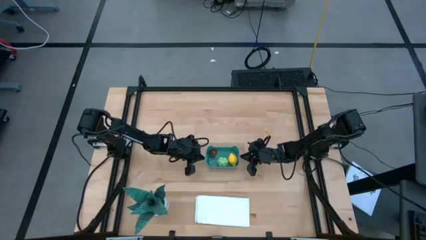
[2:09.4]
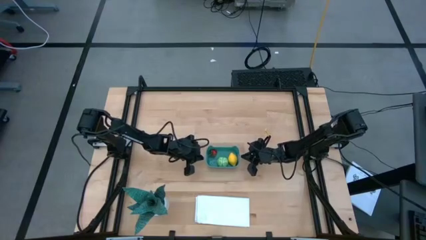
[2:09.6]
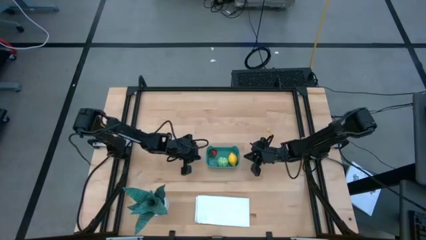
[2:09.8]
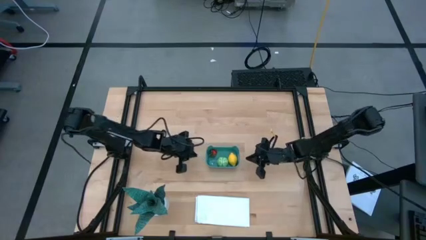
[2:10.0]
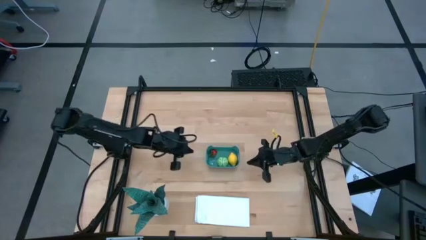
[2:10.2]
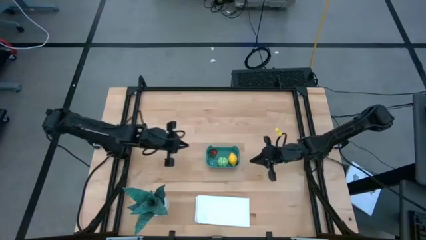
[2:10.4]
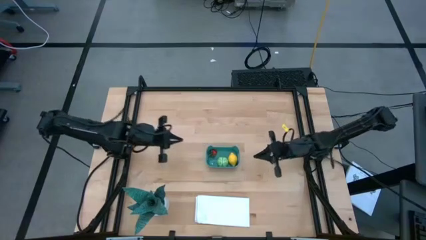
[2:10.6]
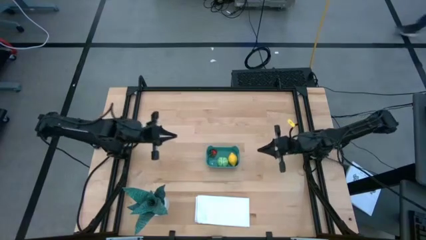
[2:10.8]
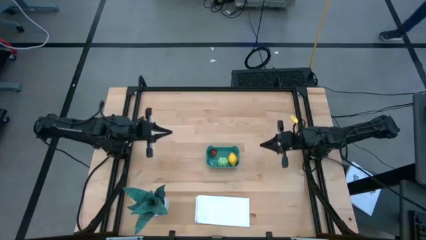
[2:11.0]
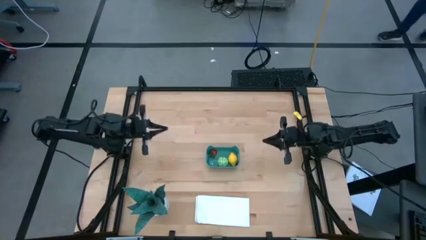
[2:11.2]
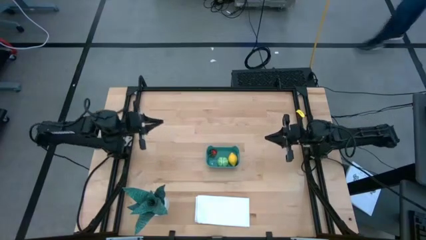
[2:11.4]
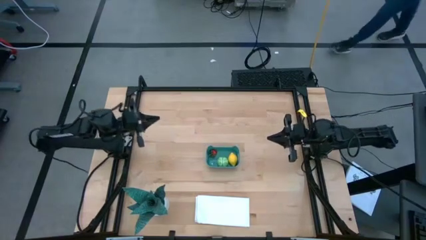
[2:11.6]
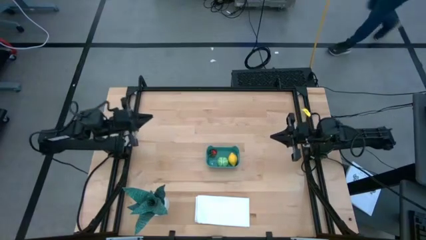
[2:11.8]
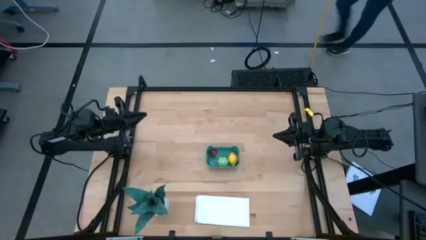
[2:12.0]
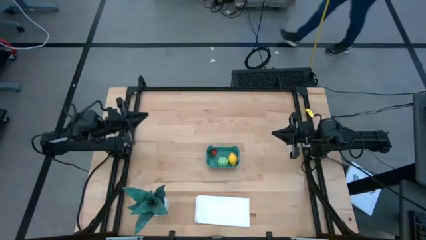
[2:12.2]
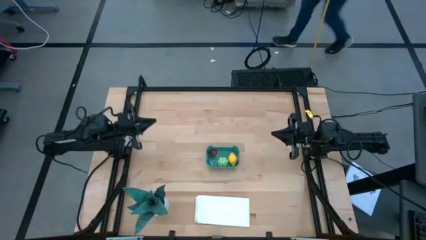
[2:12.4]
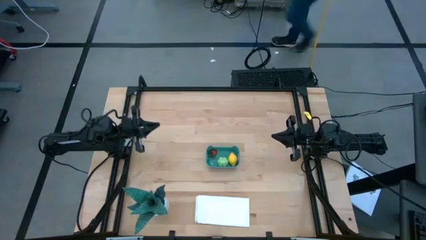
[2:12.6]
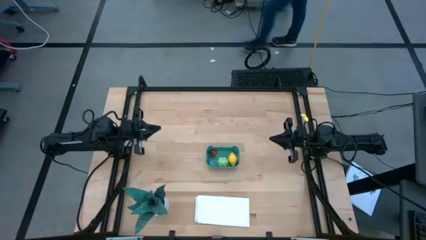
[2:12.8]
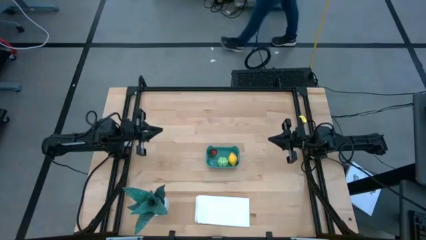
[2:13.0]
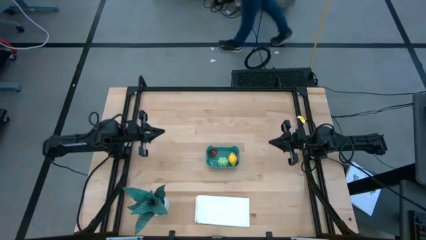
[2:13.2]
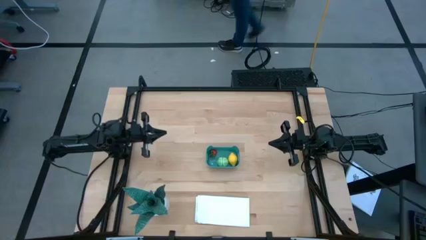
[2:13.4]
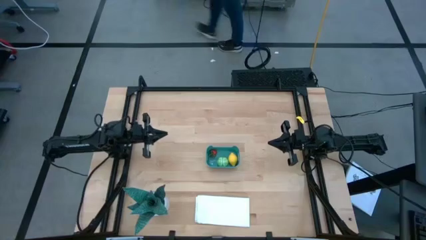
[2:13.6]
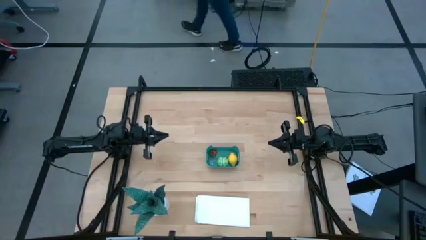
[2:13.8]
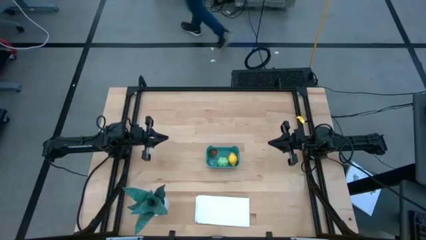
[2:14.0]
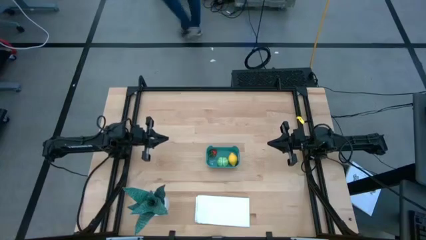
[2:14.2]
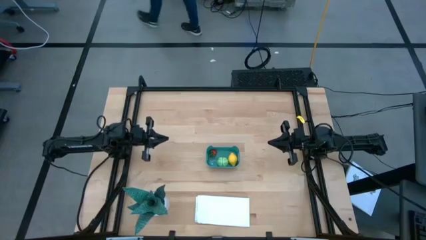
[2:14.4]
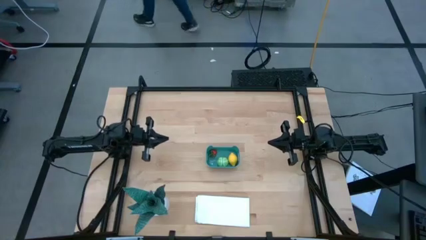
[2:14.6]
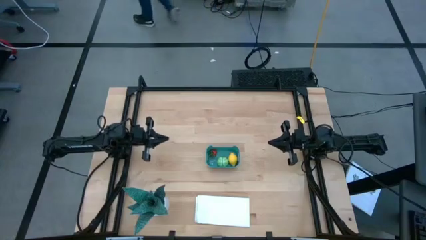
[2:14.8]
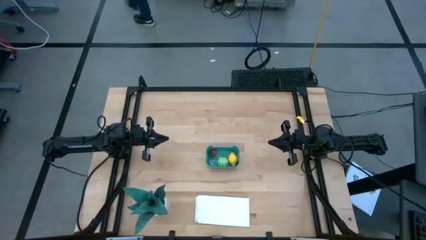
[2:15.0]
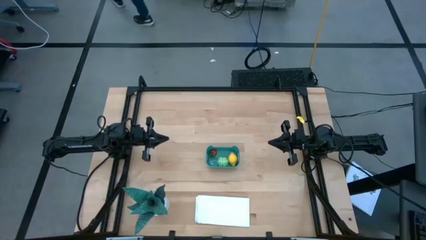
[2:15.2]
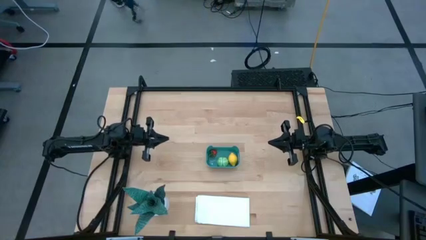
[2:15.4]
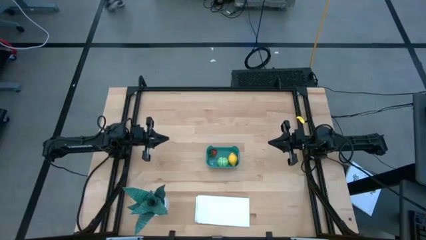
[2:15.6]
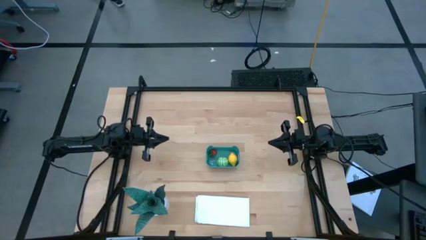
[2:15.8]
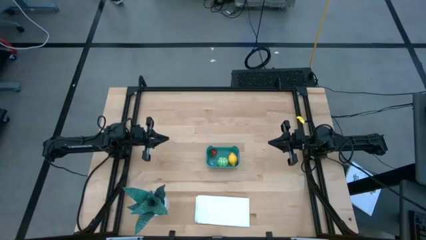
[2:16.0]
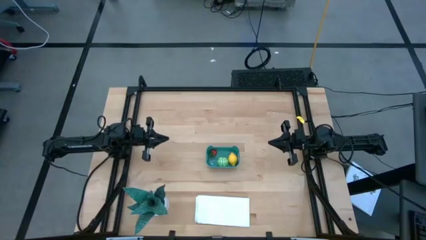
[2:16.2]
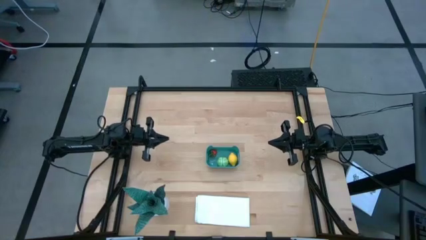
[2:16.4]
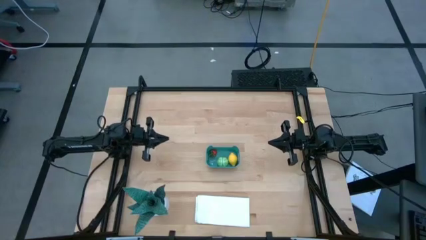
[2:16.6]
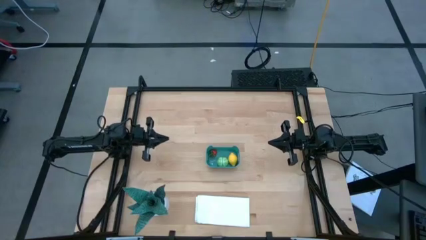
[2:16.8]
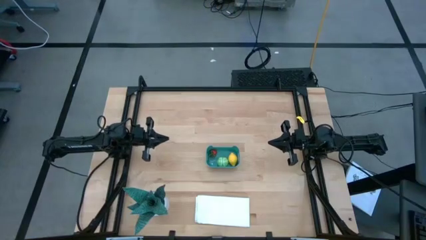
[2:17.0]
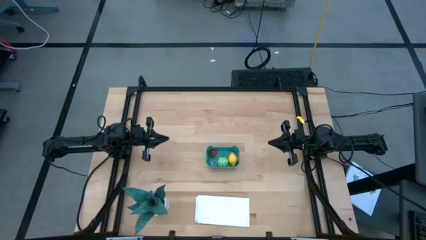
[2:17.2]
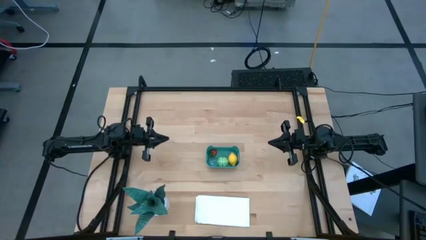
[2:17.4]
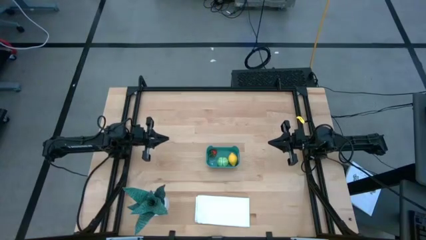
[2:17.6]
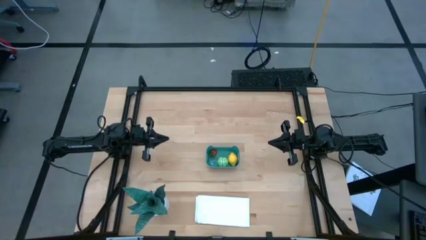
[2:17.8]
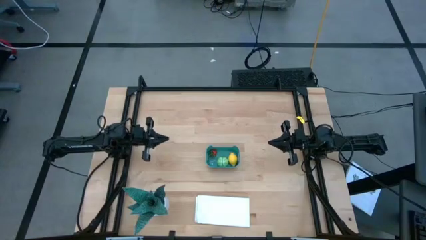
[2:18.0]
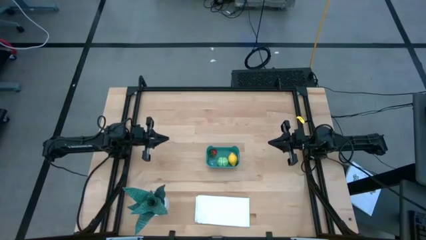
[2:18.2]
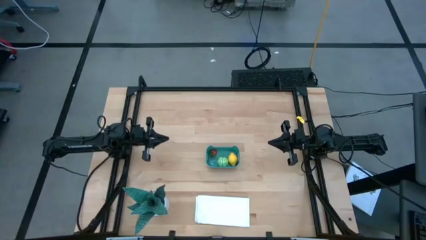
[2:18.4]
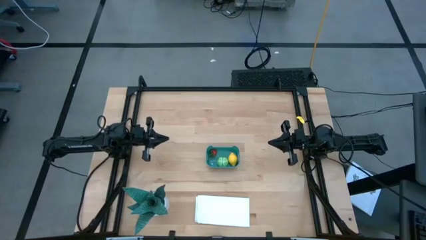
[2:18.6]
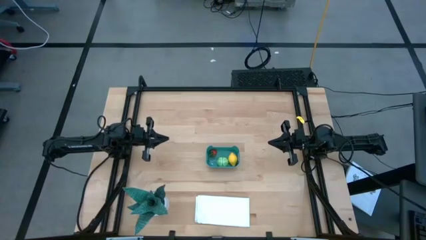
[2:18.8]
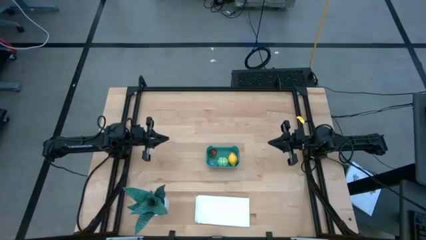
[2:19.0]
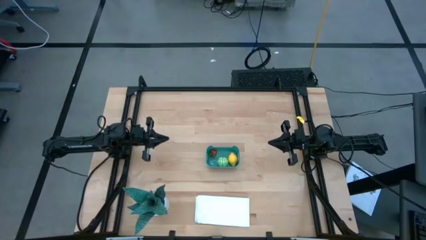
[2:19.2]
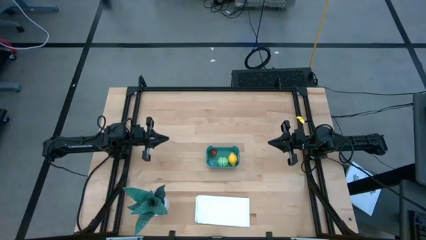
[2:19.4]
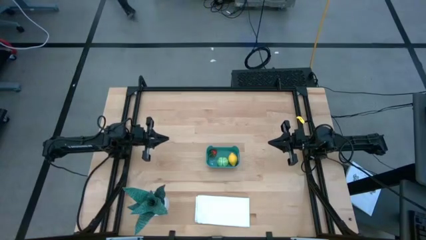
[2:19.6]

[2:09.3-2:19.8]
Task: Pick and placing Produce into tupperware
Return to Home Position

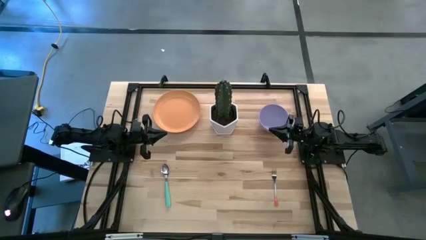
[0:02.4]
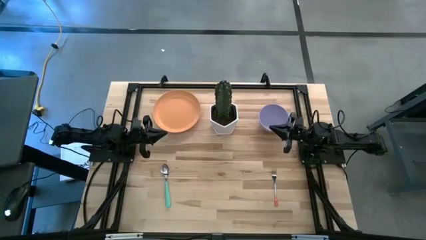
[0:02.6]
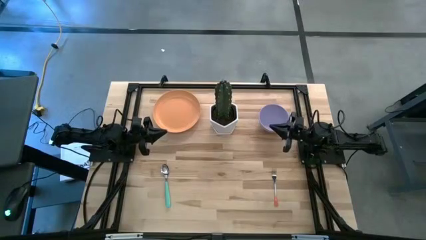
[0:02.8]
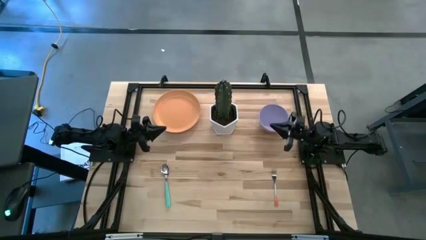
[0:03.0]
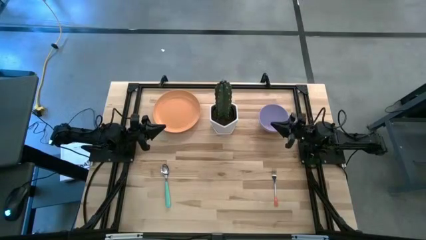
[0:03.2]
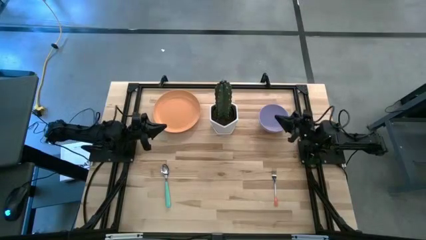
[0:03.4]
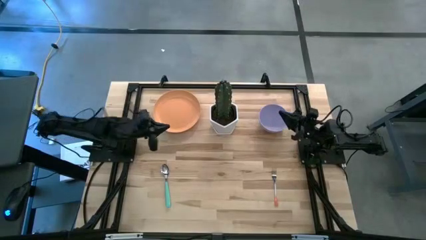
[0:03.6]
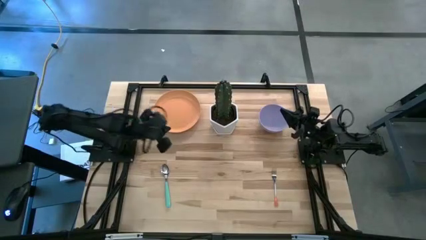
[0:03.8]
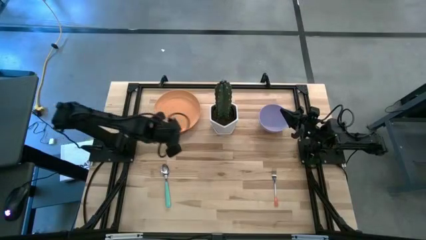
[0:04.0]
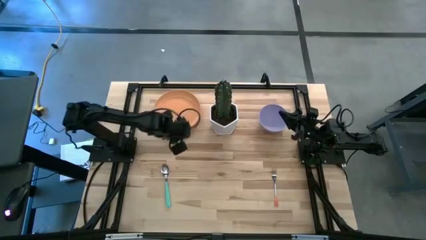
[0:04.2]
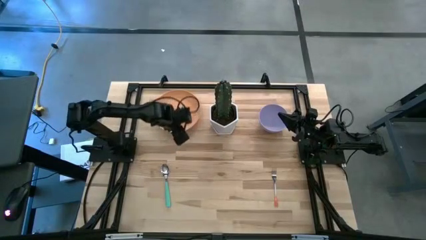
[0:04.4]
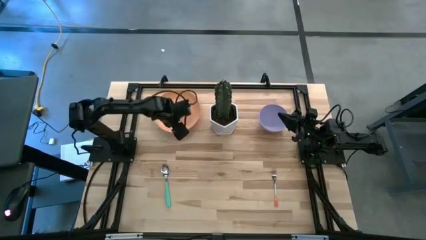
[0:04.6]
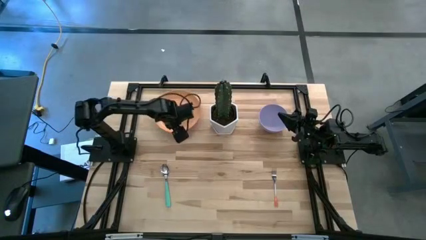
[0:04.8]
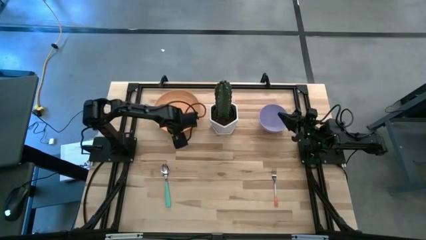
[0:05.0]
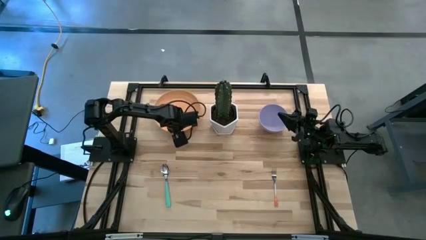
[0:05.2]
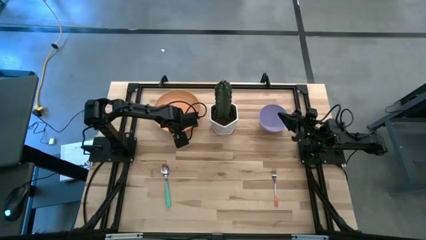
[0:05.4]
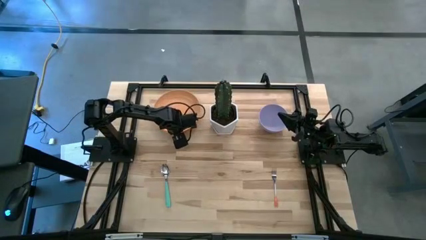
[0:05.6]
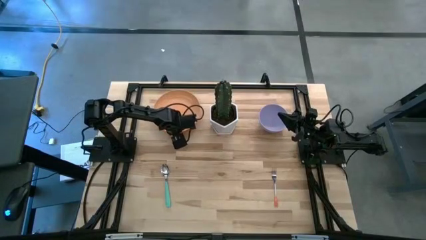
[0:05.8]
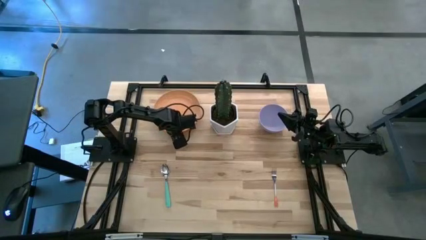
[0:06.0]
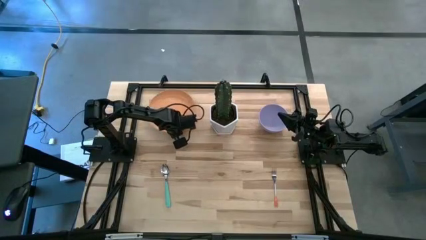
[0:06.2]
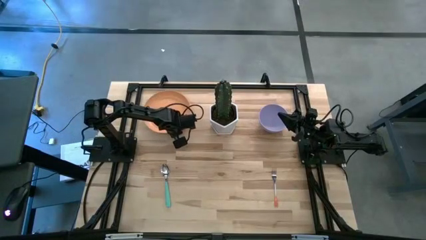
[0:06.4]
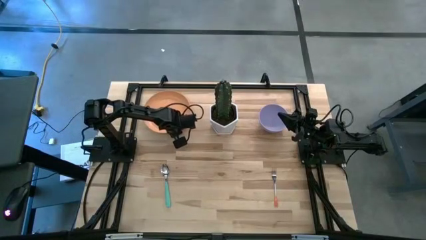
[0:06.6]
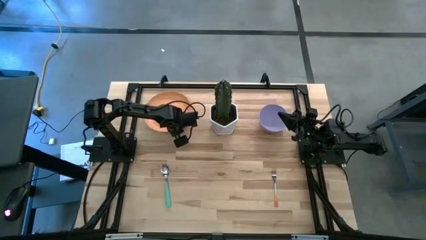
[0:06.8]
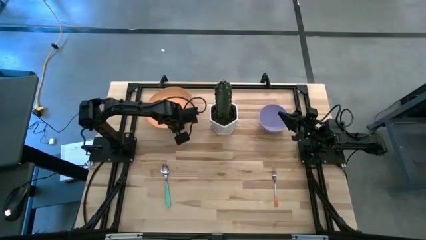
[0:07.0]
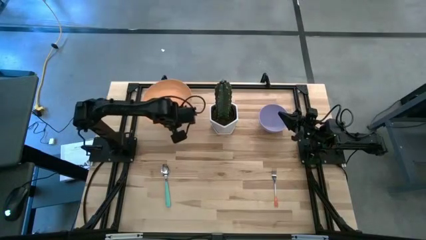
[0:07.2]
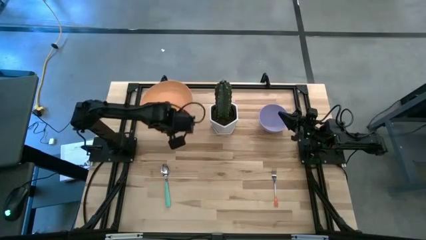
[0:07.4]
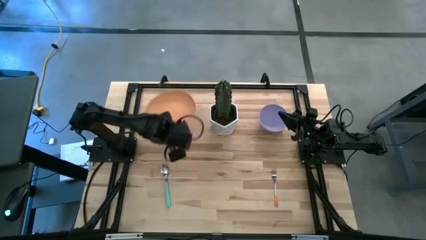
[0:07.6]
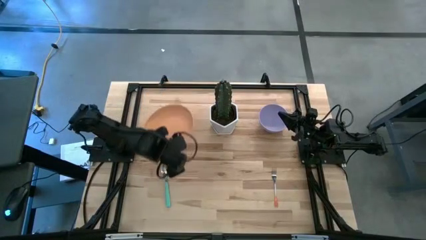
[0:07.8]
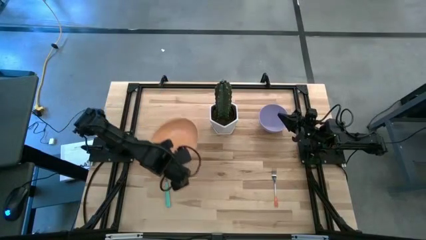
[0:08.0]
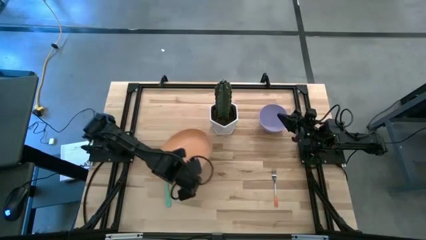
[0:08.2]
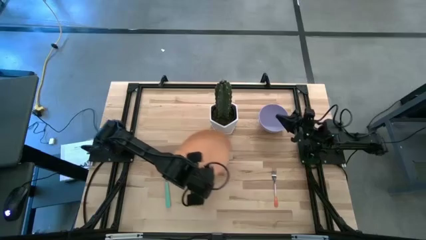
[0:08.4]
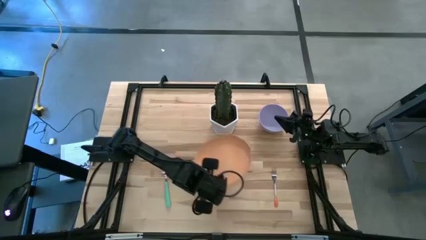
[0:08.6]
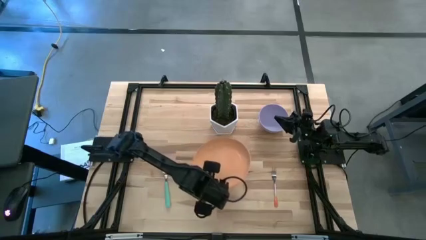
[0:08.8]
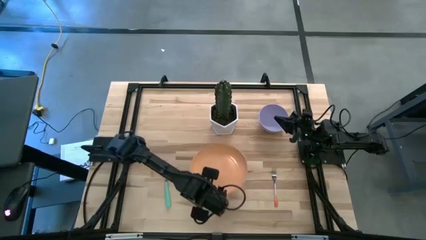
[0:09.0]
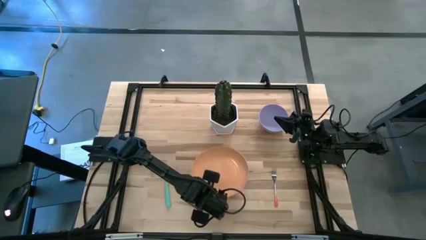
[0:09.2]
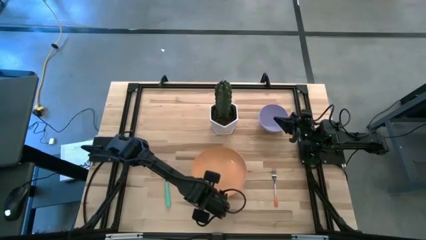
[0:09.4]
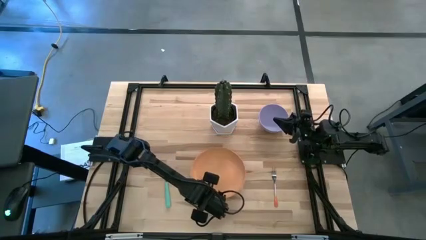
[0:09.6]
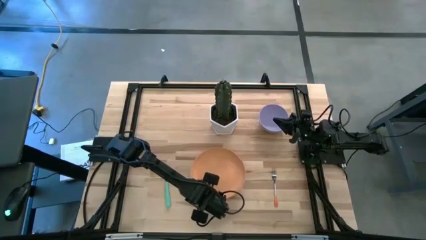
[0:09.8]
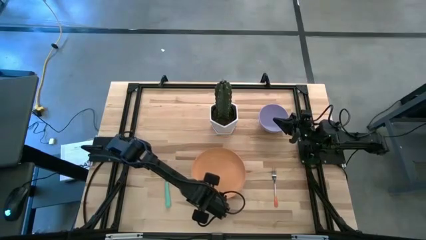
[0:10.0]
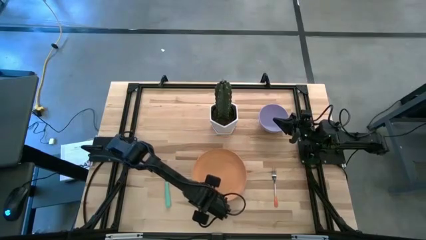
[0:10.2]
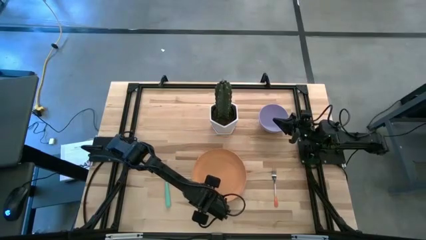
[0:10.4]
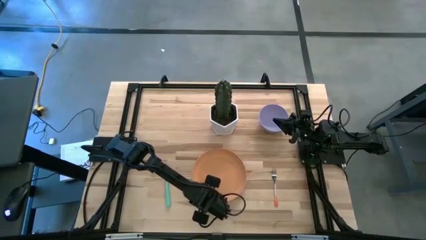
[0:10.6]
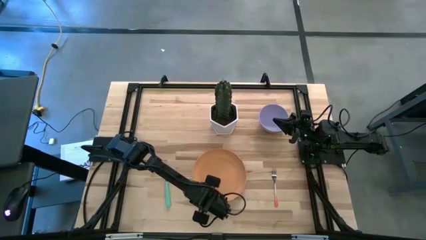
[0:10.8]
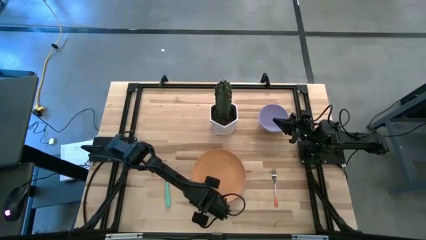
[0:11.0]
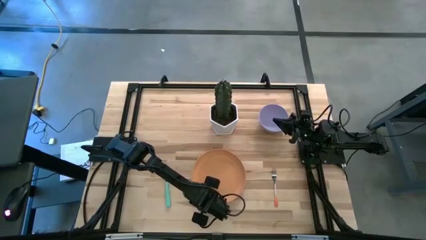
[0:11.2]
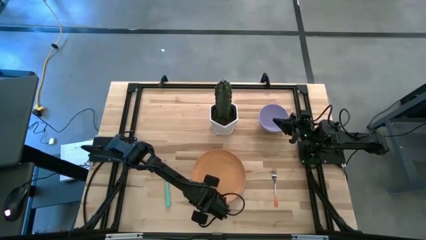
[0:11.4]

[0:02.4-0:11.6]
Task: Set table place
Move the orange plate to the center of the table
